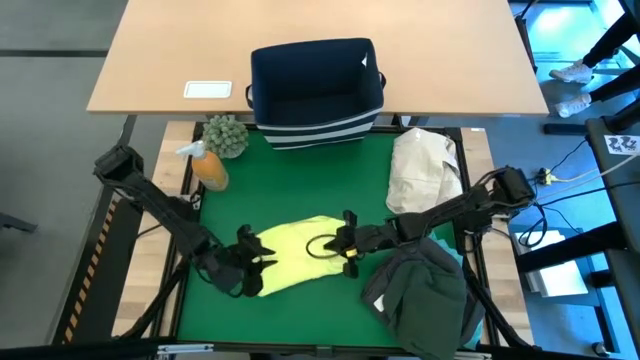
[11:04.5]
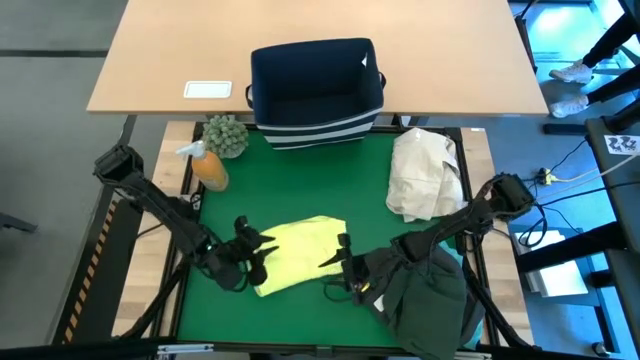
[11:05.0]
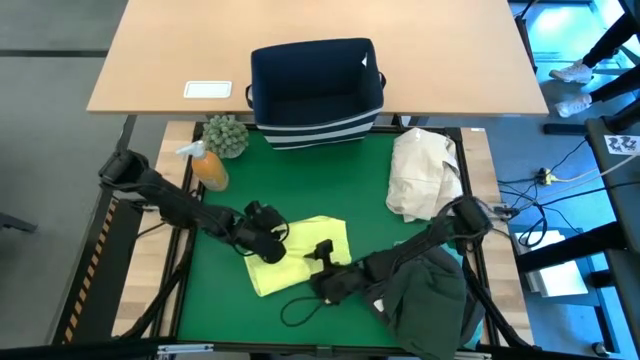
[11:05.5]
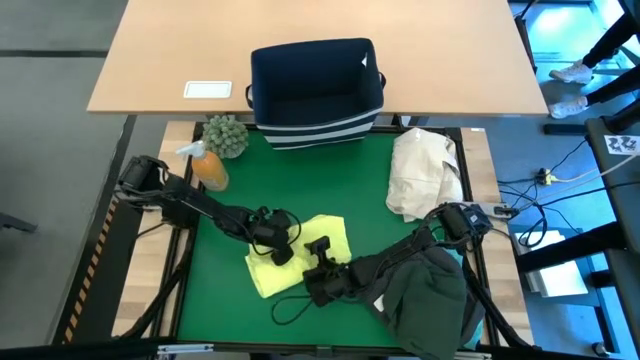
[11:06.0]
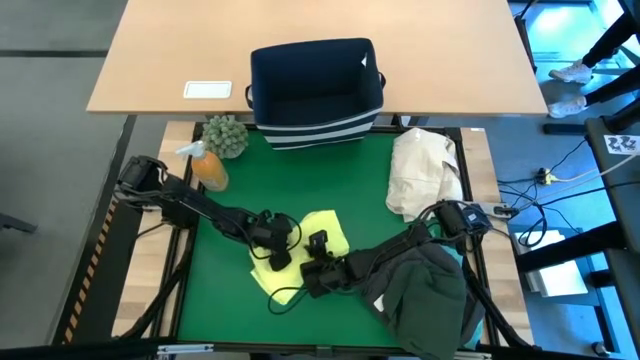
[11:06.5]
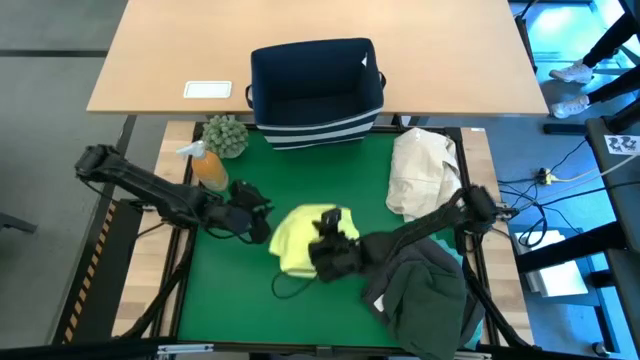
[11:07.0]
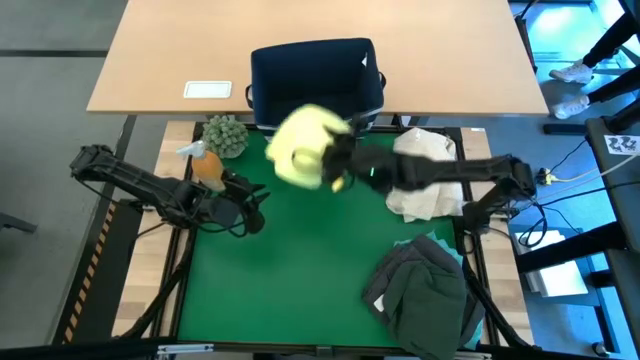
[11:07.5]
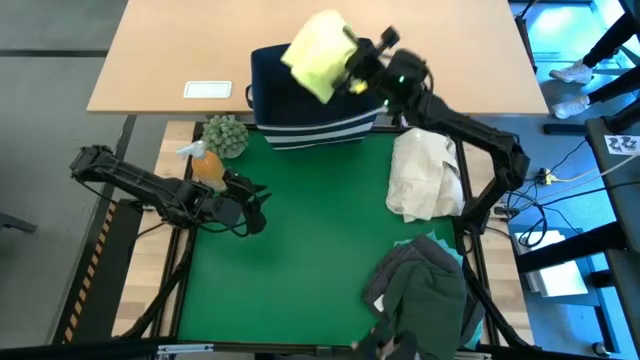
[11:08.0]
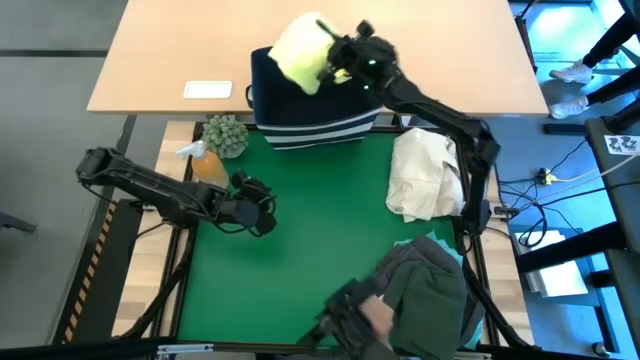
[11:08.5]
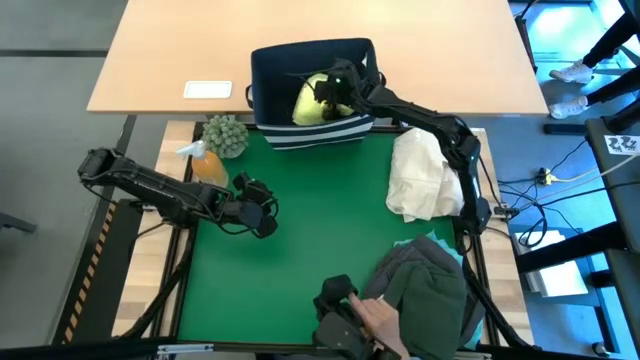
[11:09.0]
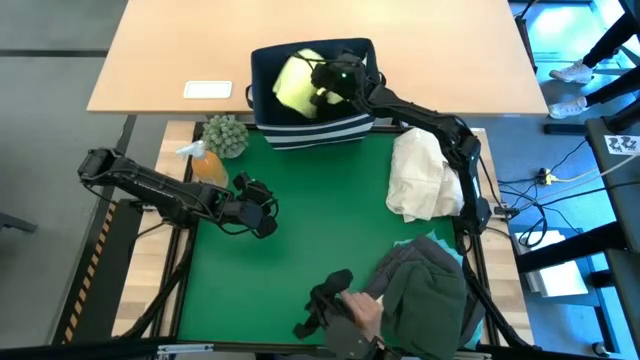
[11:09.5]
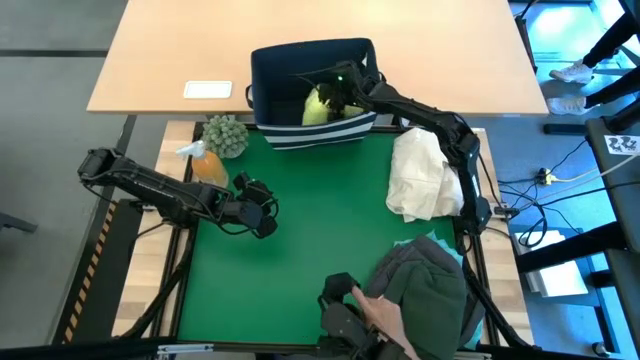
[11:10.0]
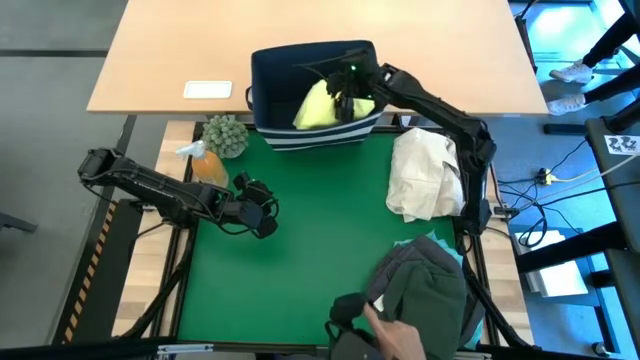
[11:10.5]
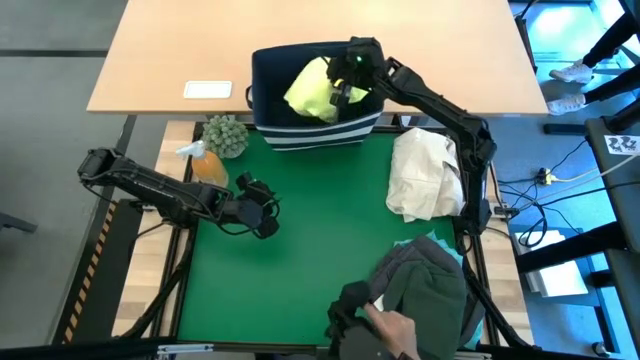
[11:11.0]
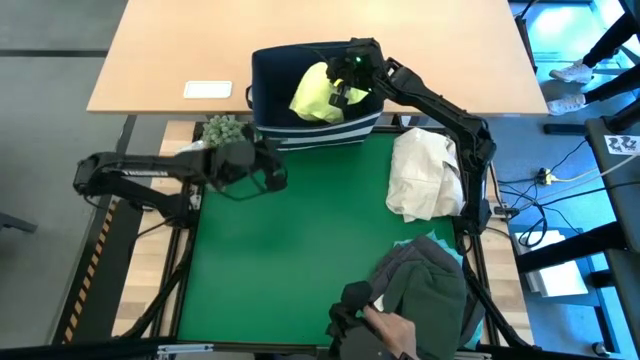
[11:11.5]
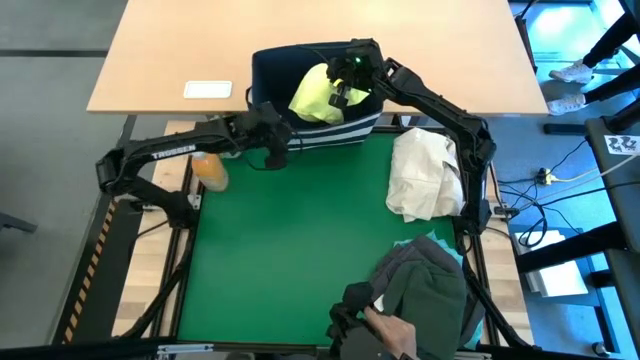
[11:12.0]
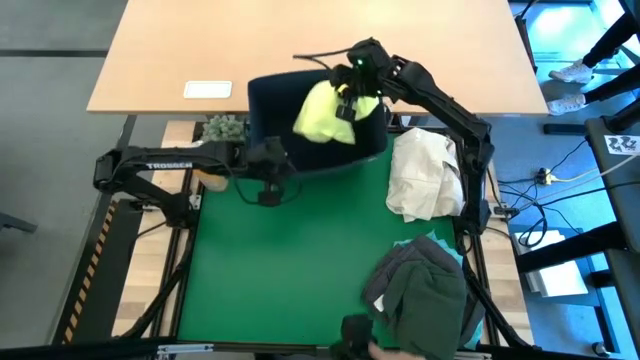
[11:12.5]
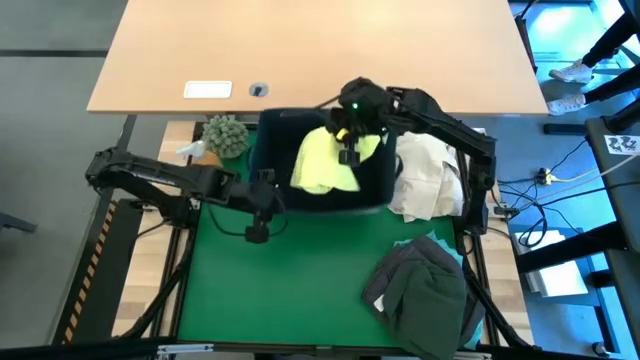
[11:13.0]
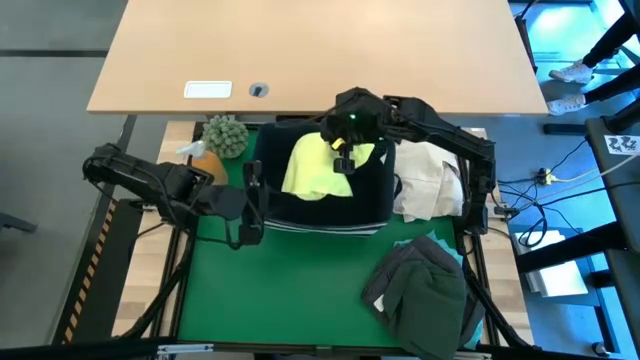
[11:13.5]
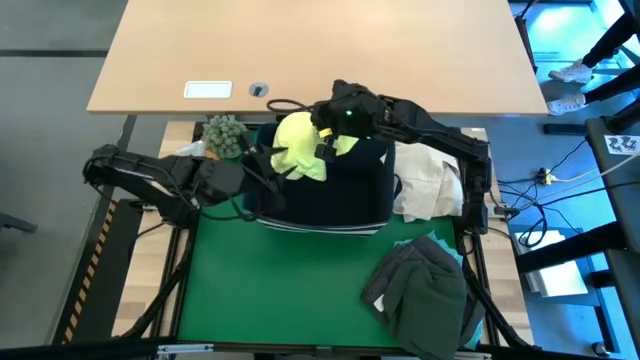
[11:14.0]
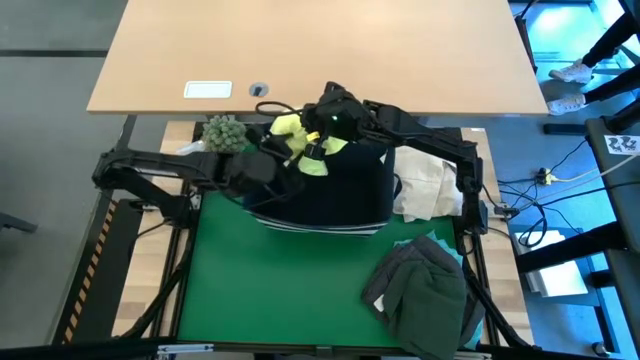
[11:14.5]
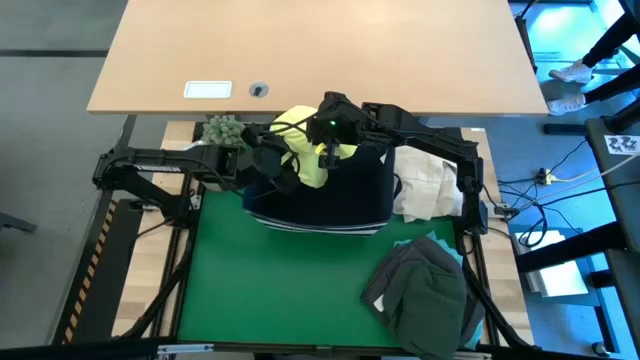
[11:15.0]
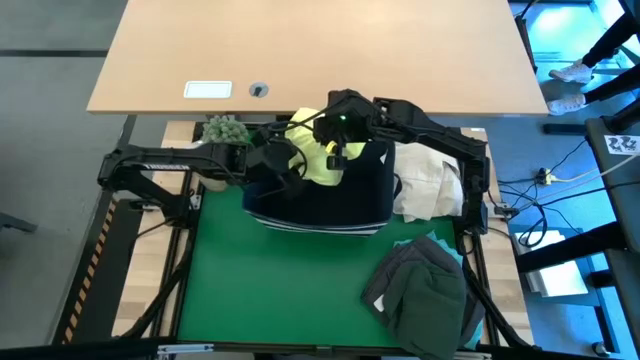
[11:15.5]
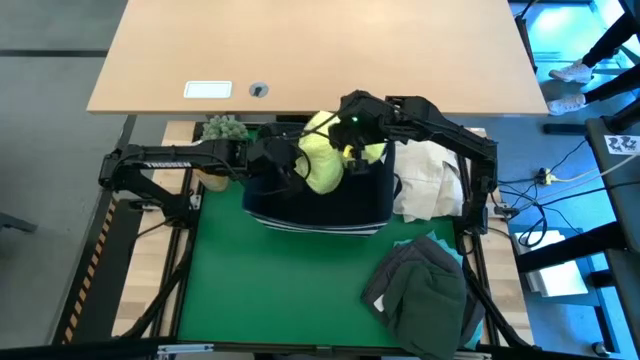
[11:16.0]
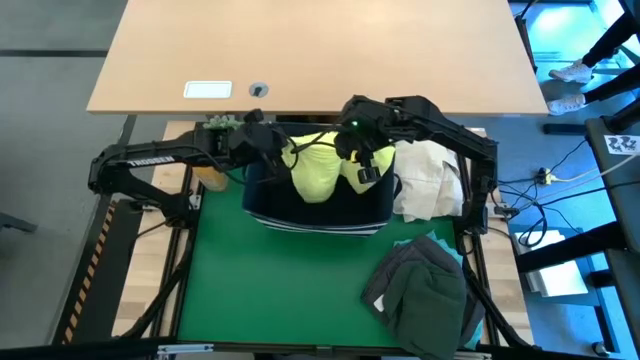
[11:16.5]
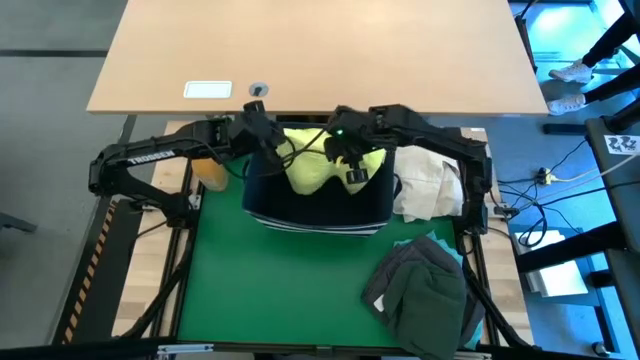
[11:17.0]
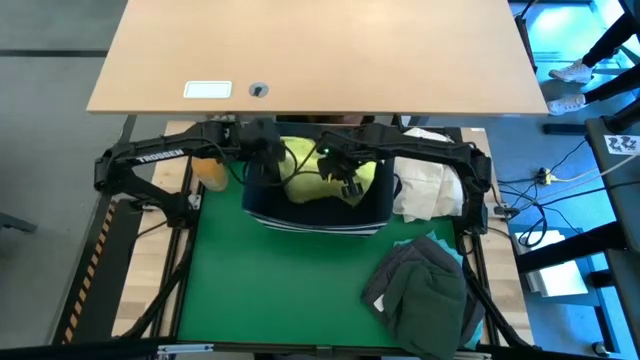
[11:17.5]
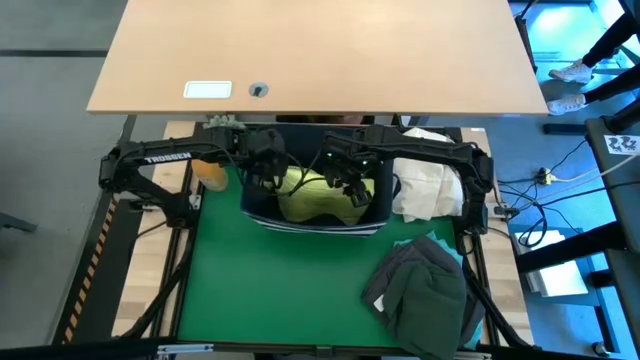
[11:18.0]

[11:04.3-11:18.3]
Task: Fold laundry
Put the yellow shirt into the laundry bin
